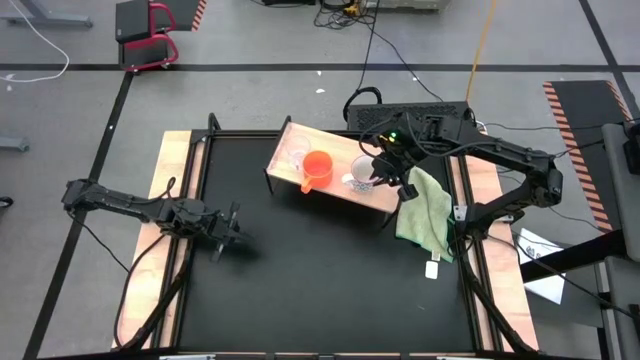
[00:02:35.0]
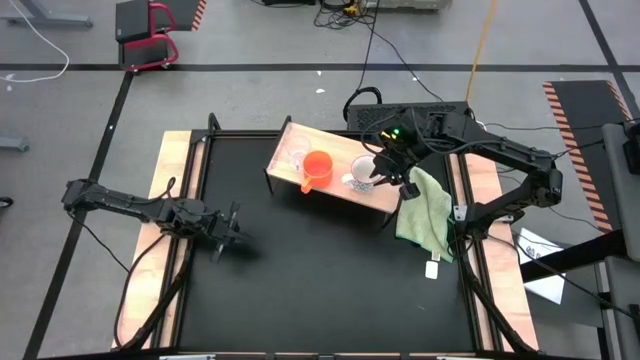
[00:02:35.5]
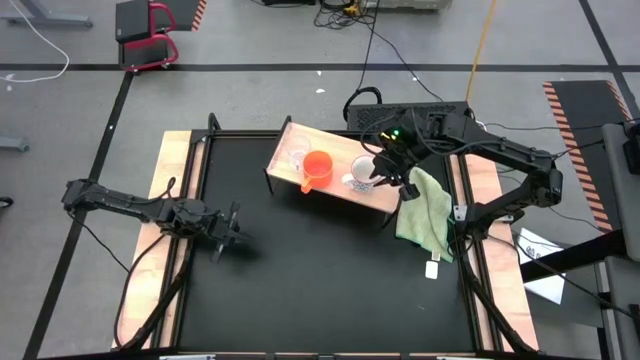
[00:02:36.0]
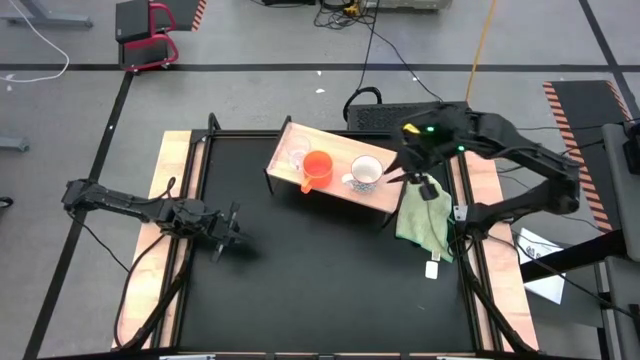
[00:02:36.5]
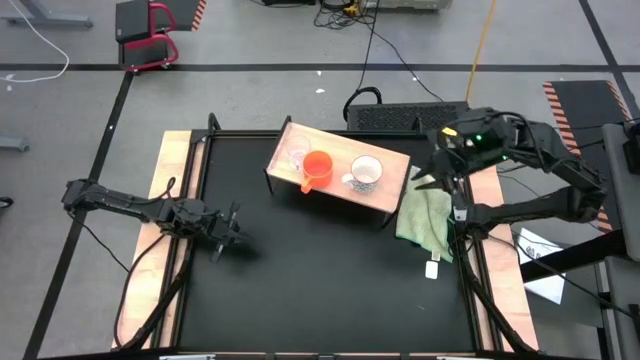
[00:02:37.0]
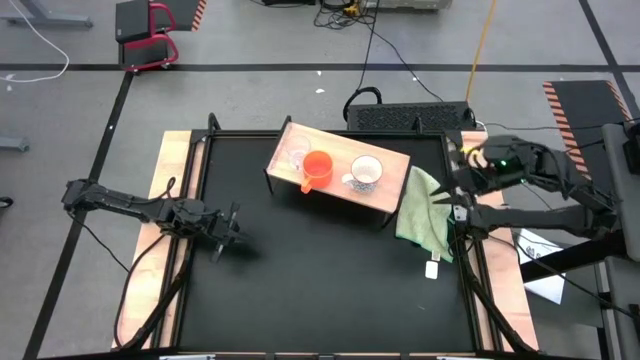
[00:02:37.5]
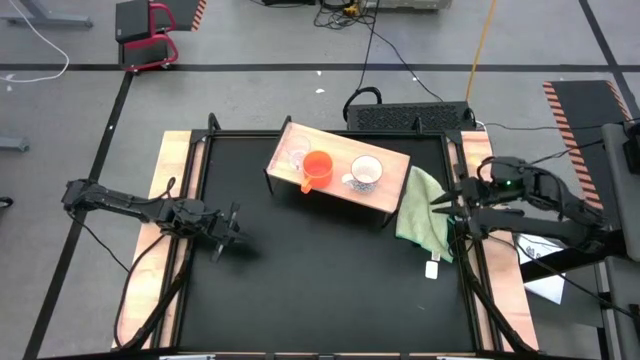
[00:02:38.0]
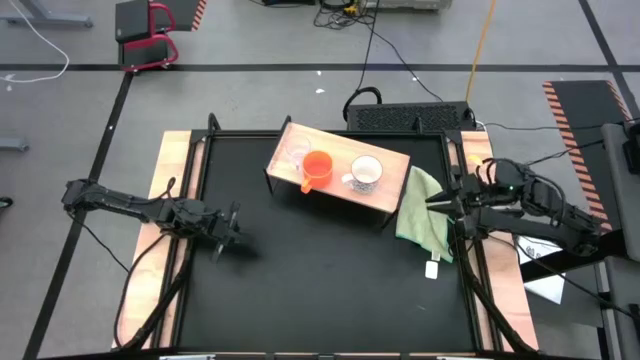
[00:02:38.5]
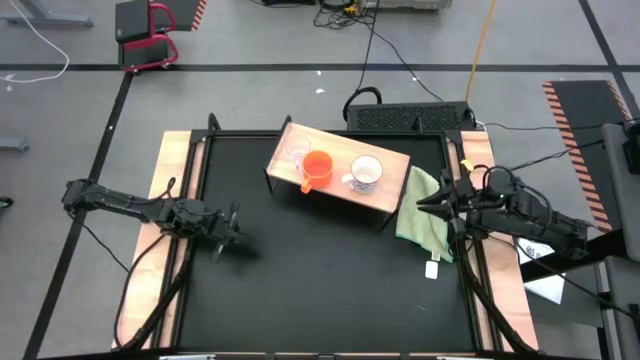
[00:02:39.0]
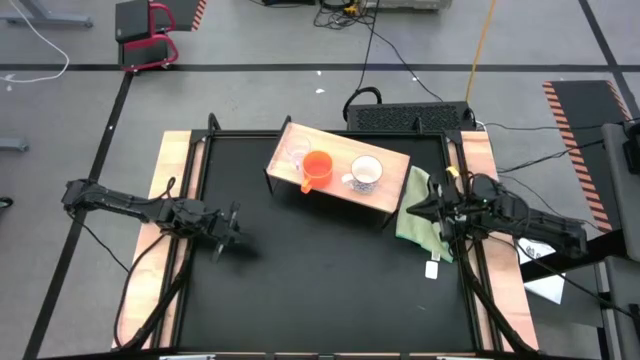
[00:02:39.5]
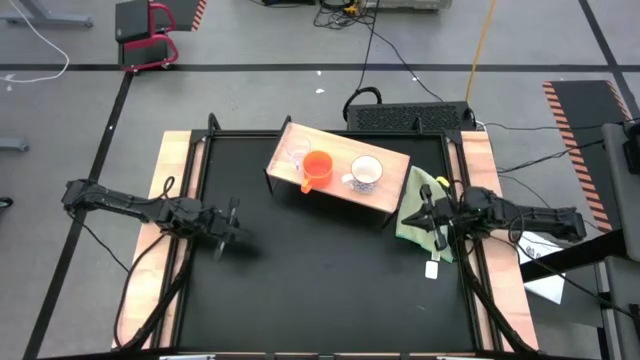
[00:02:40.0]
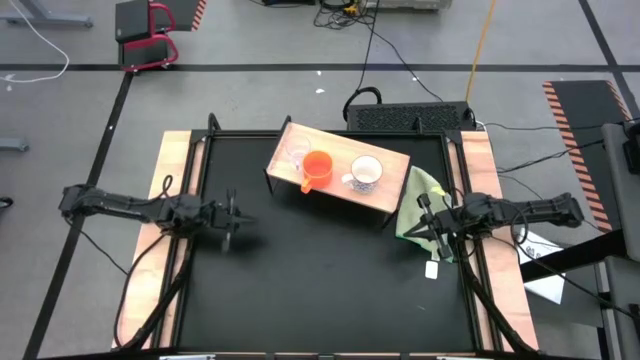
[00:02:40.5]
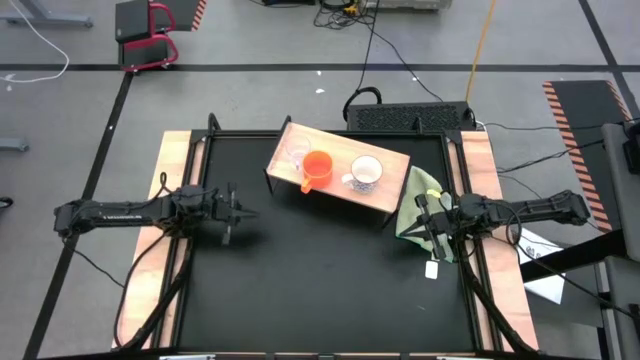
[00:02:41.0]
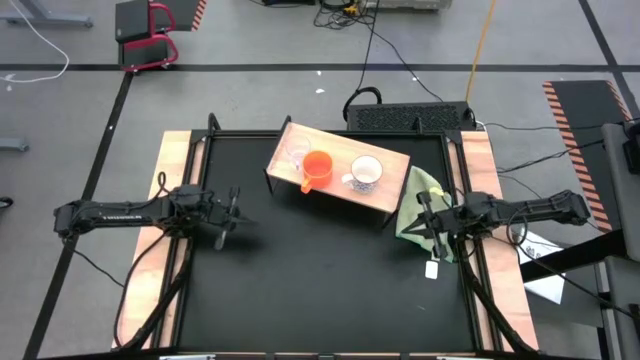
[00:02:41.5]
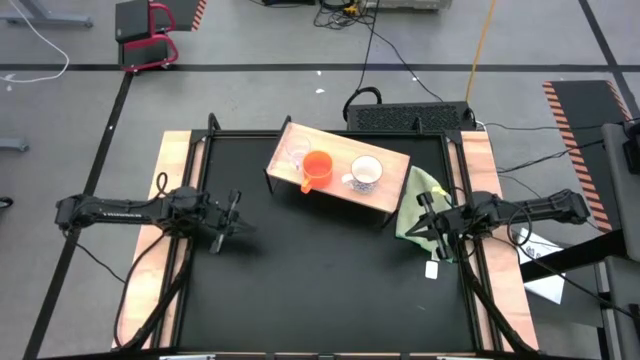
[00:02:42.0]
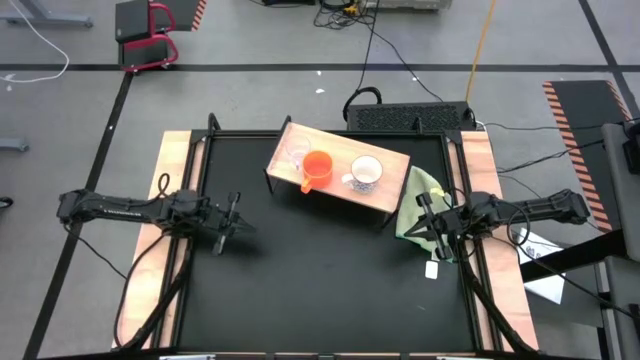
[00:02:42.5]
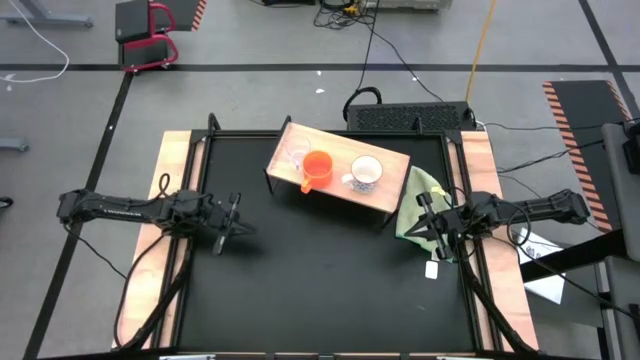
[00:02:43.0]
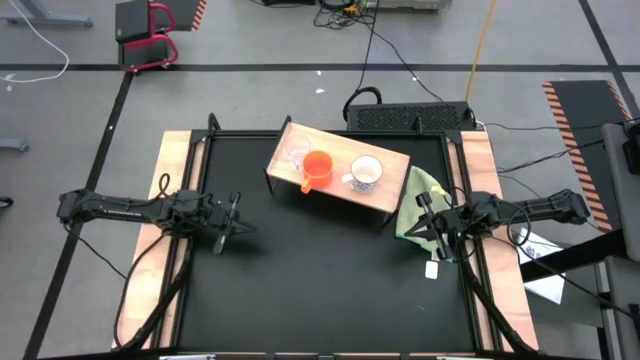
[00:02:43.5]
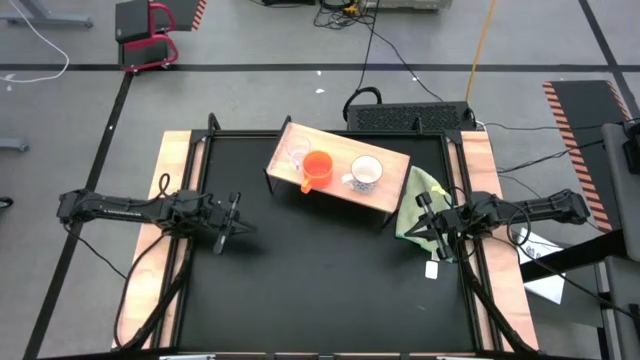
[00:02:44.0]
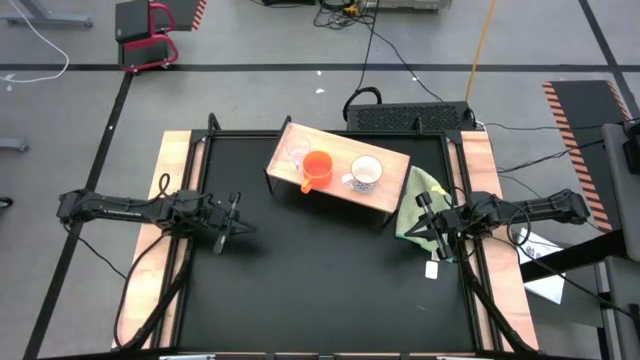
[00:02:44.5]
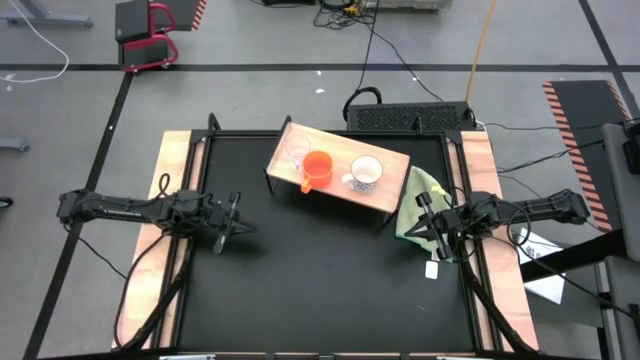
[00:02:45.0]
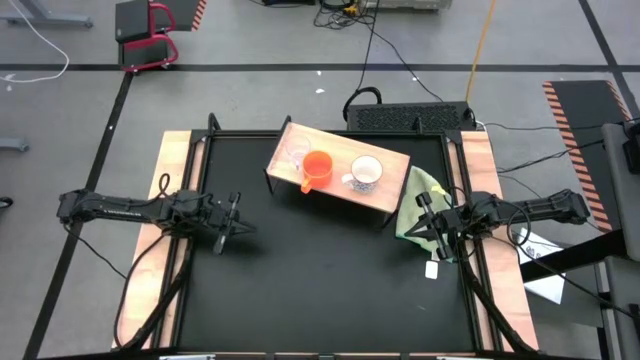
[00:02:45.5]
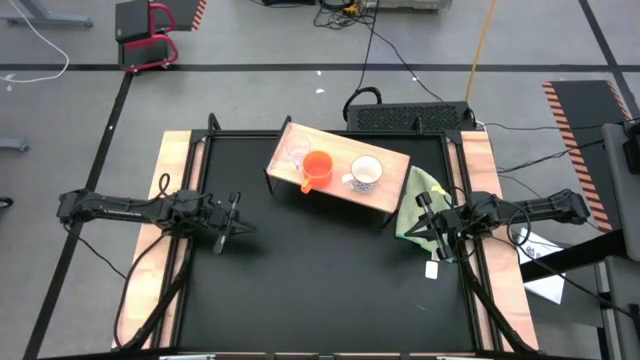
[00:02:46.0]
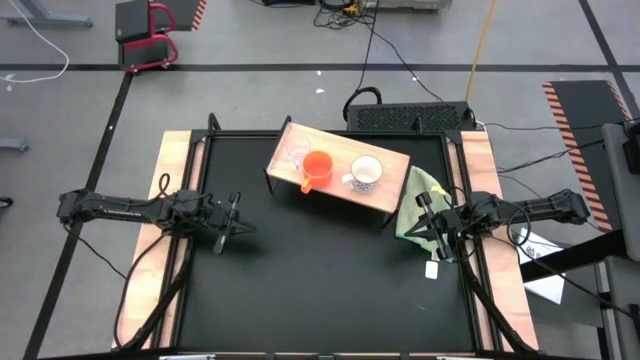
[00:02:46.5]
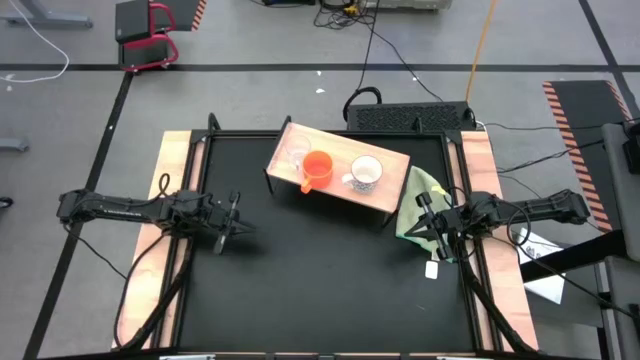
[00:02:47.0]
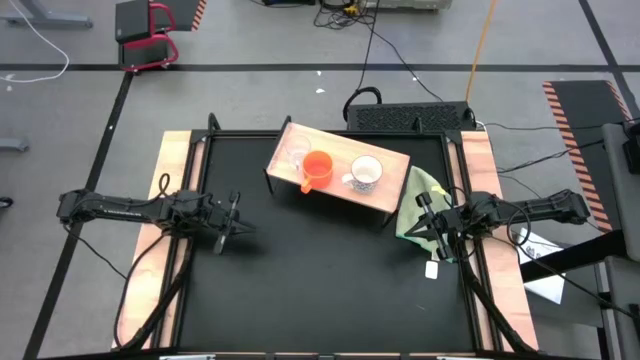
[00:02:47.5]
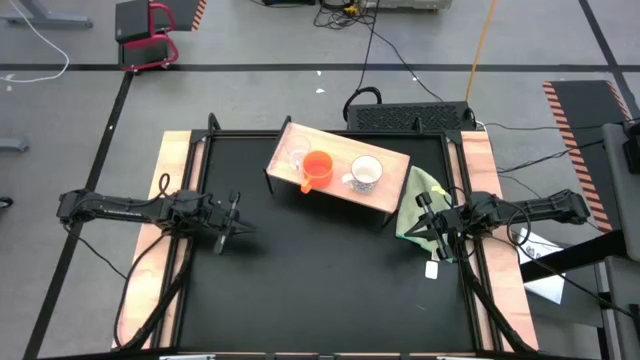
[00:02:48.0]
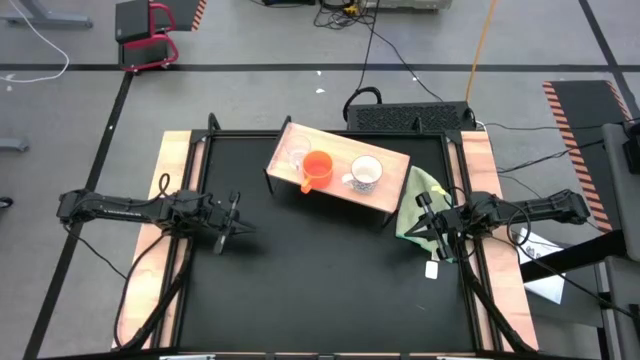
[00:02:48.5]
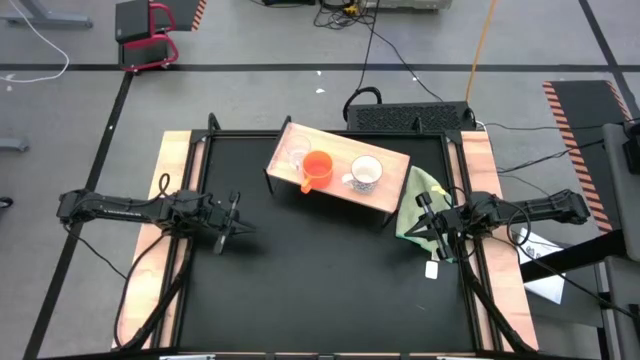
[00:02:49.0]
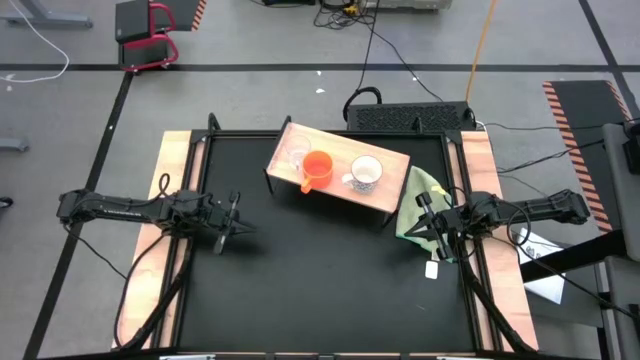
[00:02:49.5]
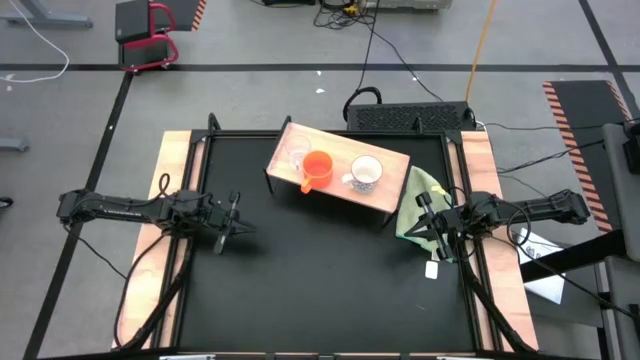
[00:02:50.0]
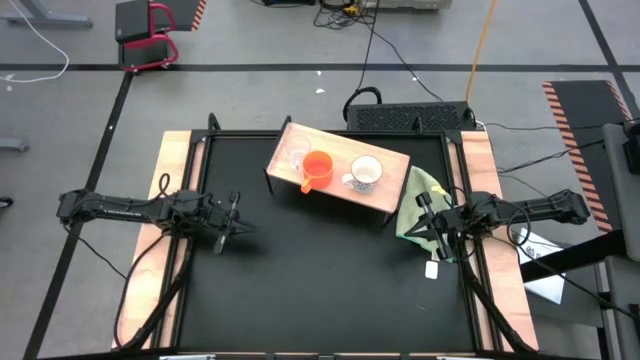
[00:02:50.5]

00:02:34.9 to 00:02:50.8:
Task: Stack small to large cups/mugs on shelf
Return to Home Position
